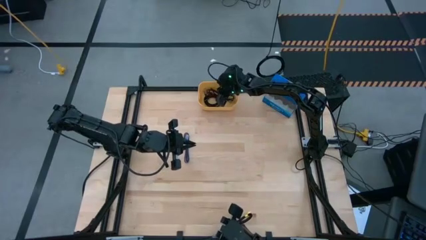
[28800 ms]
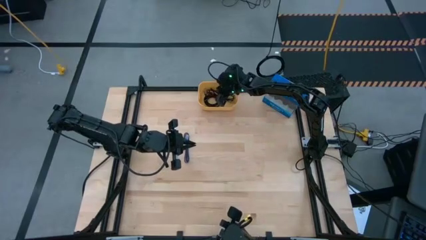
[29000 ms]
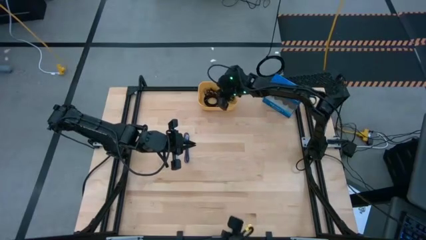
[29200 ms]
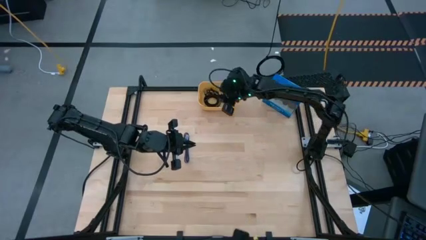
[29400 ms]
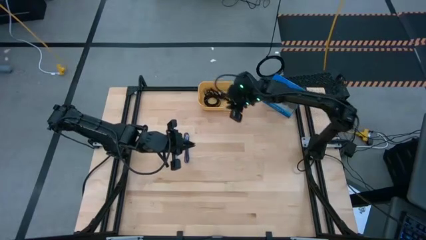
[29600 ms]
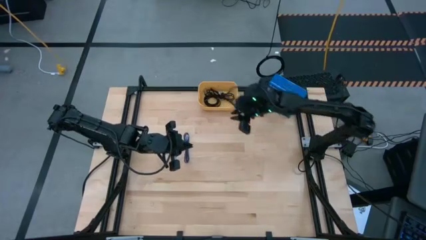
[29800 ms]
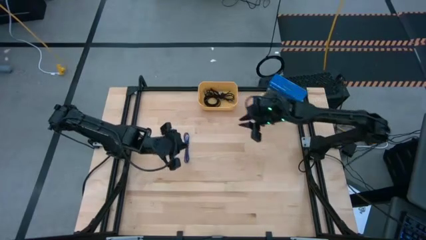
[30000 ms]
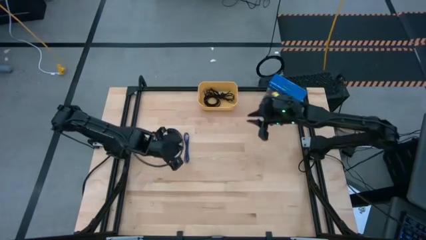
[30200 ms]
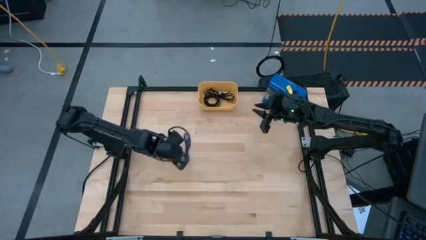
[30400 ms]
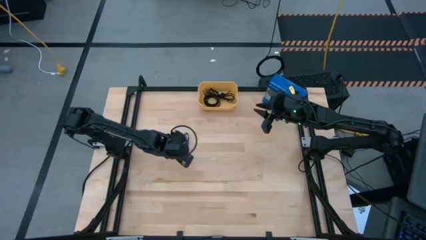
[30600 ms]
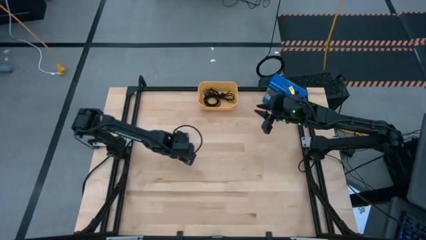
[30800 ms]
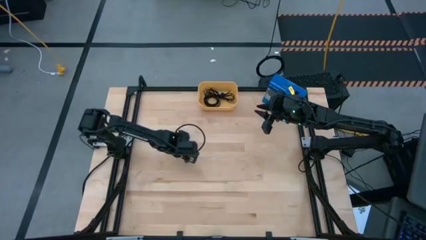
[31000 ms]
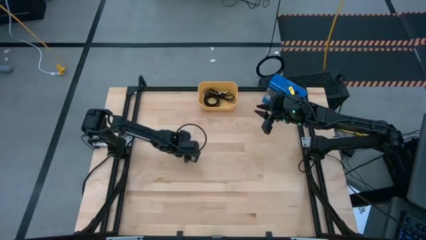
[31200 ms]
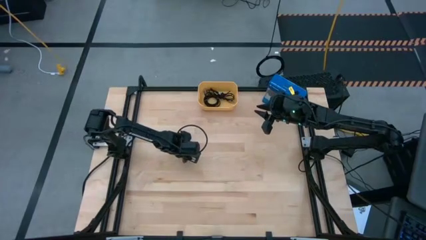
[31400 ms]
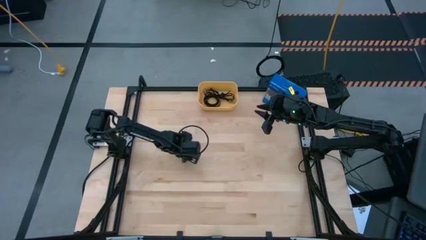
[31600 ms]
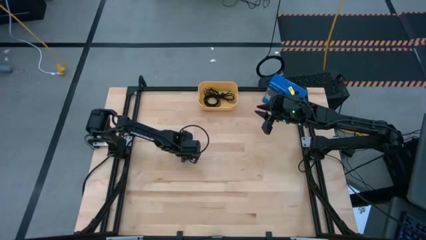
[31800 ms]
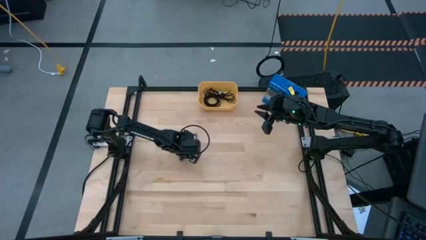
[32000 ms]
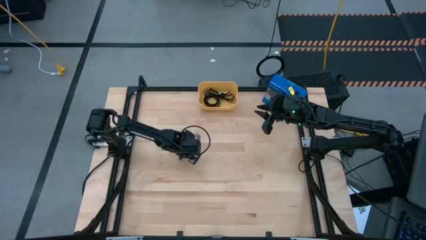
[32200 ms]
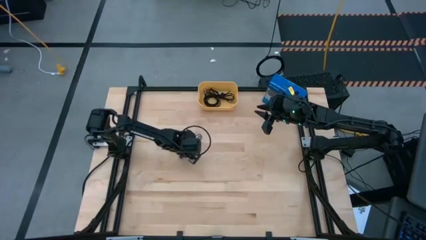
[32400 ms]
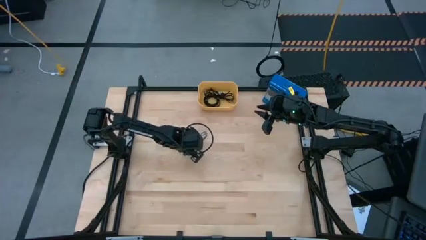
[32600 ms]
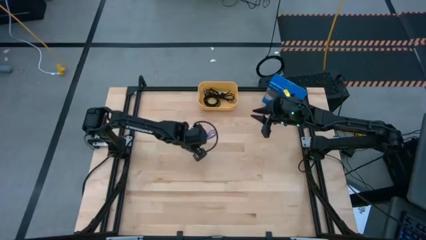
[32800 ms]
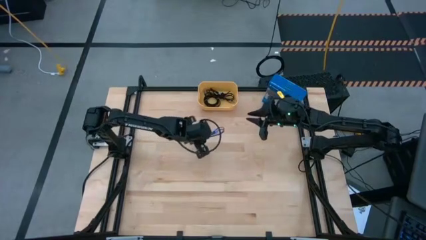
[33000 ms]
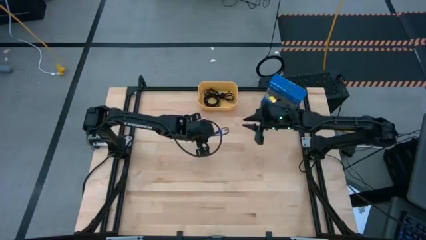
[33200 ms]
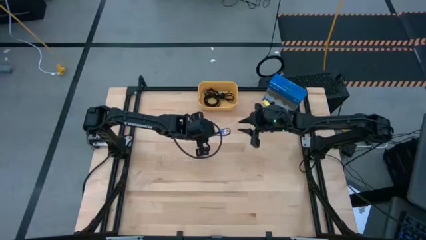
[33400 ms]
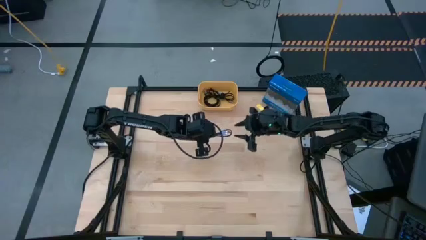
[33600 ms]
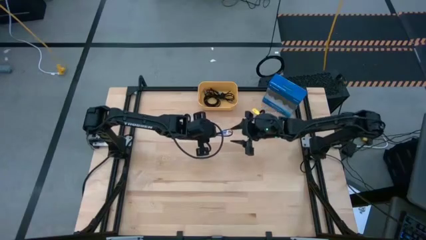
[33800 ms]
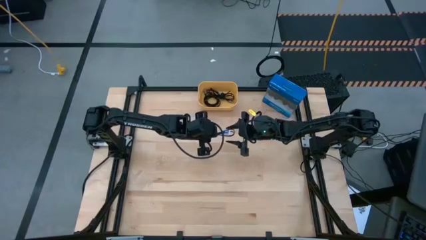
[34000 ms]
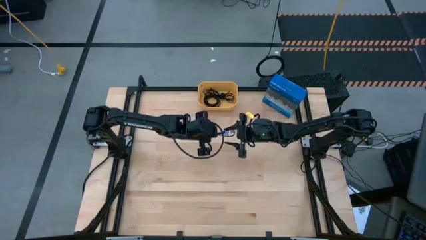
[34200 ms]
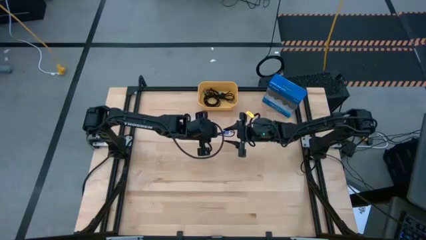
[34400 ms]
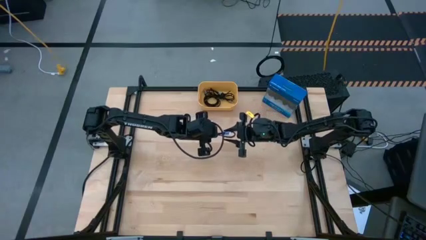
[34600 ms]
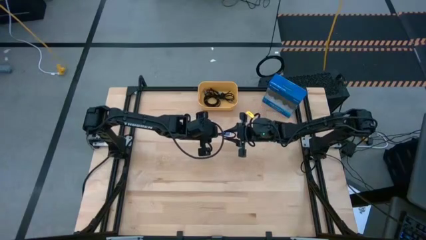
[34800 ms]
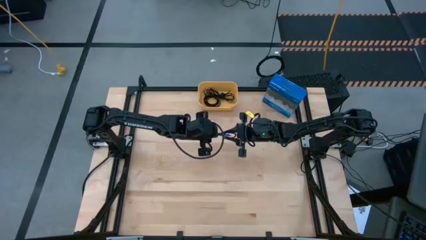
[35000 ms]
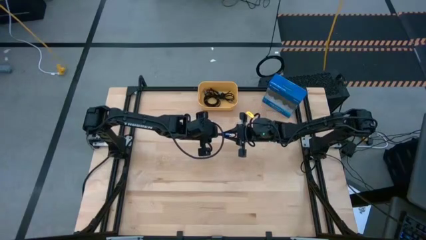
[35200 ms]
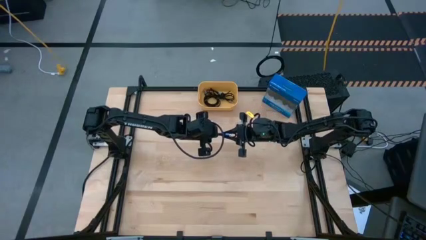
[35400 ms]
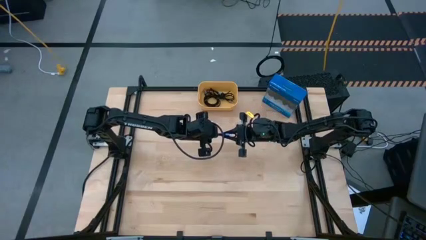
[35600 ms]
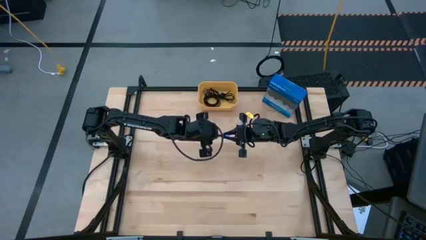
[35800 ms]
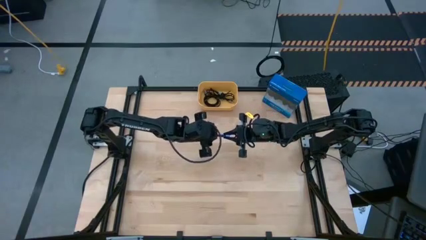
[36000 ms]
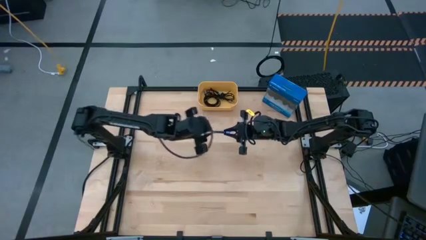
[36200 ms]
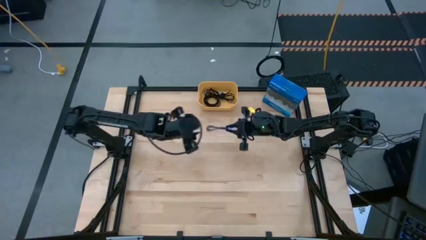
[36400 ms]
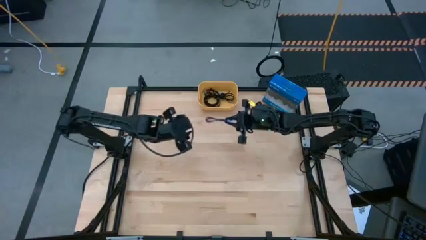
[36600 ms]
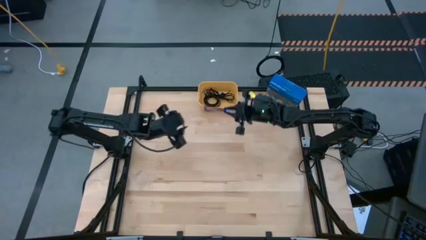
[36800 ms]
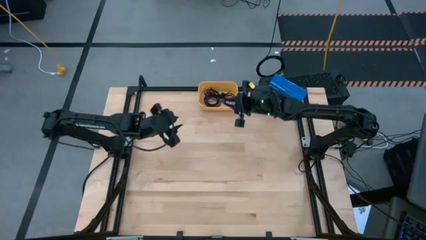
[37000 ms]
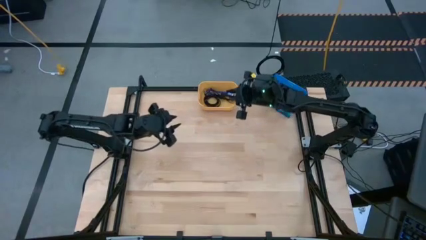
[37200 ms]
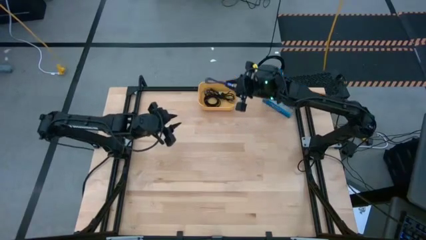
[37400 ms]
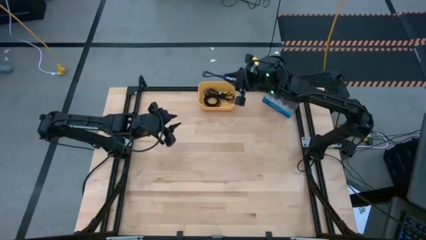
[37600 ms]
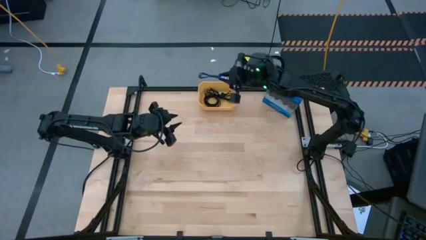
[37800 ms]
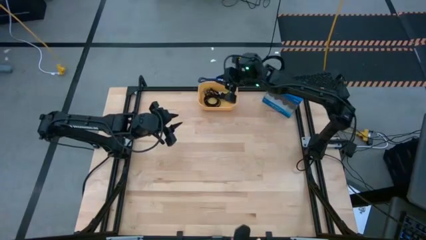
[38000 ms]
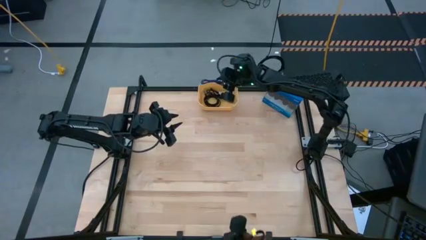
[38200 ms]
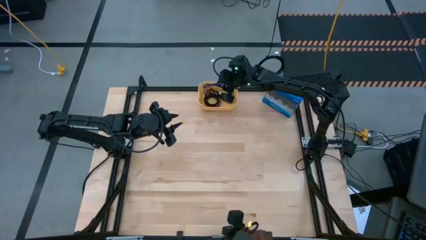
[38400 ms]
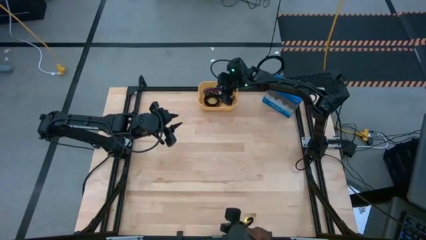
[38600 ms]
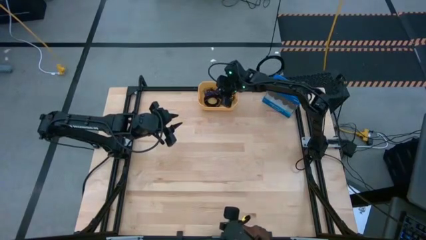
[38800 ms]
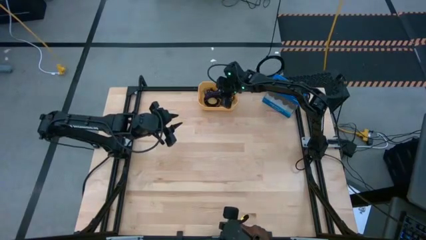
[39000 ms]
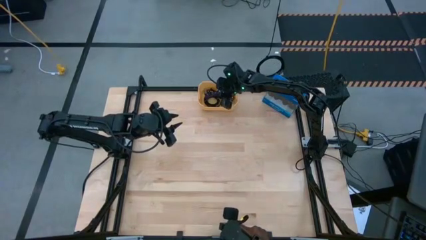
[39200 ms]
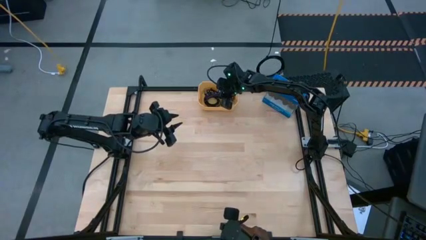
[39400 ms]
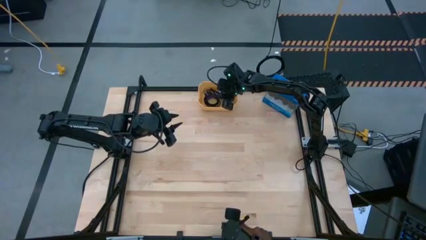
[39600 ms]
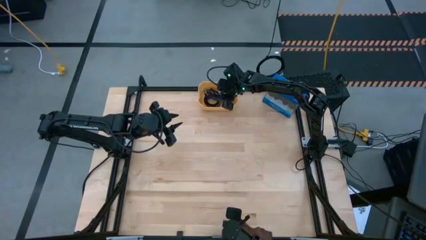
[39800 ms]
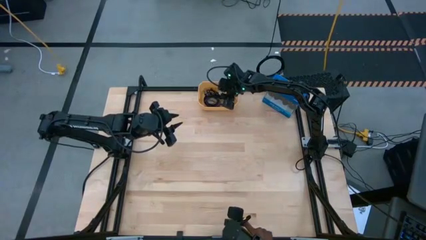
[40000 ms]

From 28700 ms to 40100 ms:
Task: Pick and place USB-C Cables
Put the blue charger cable into the yellow bin

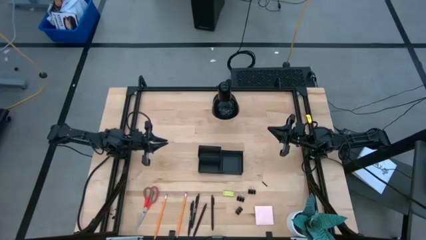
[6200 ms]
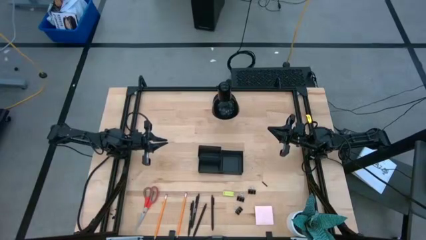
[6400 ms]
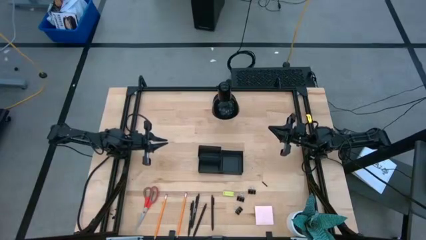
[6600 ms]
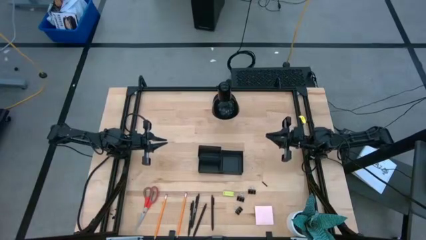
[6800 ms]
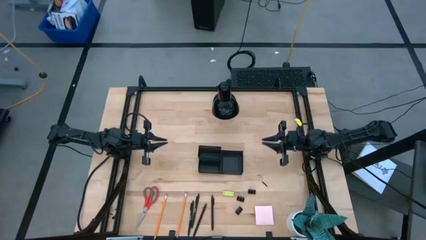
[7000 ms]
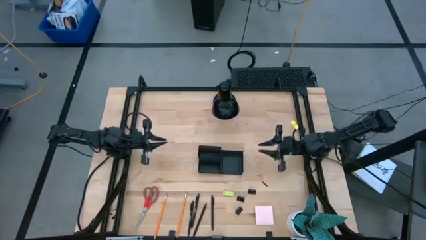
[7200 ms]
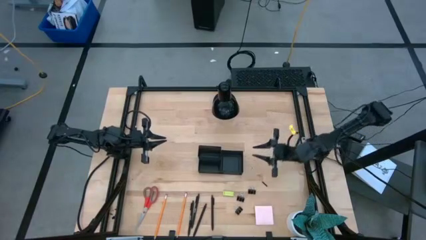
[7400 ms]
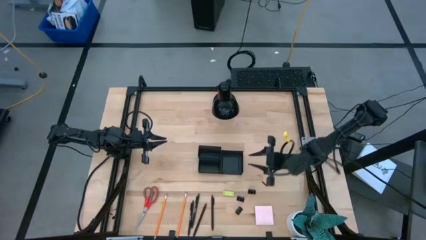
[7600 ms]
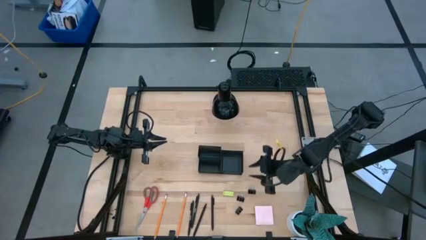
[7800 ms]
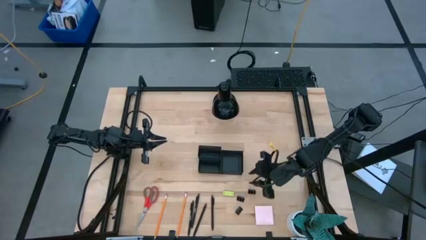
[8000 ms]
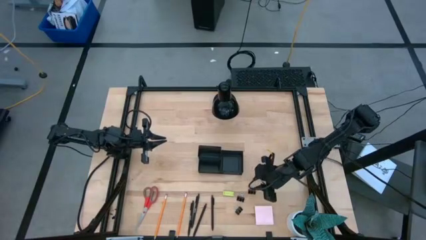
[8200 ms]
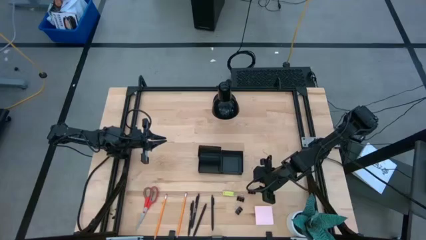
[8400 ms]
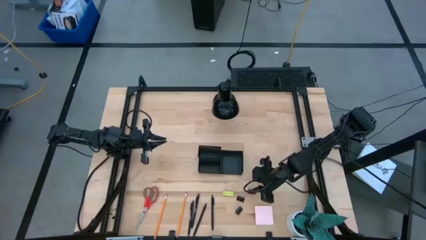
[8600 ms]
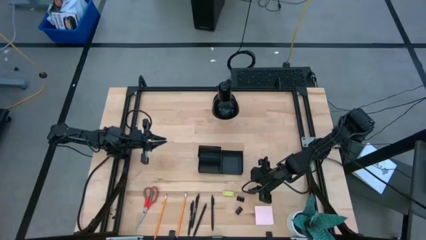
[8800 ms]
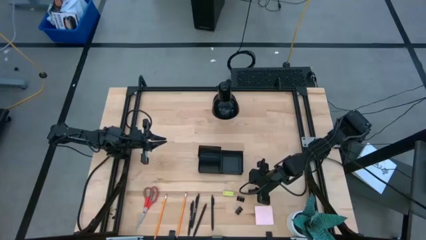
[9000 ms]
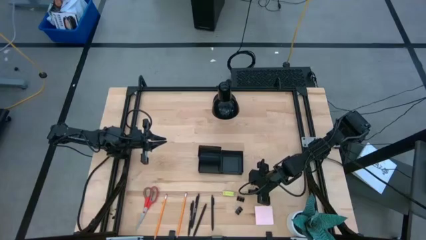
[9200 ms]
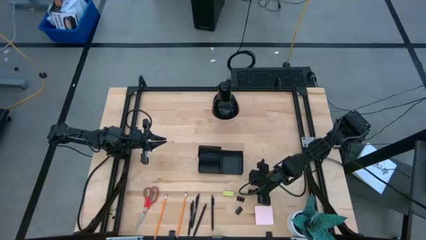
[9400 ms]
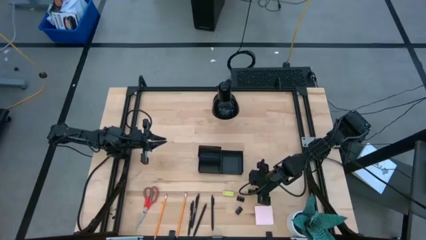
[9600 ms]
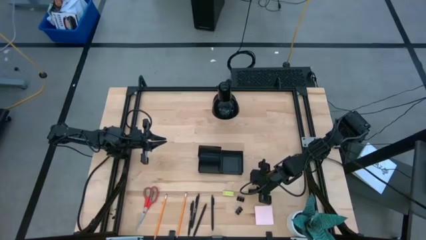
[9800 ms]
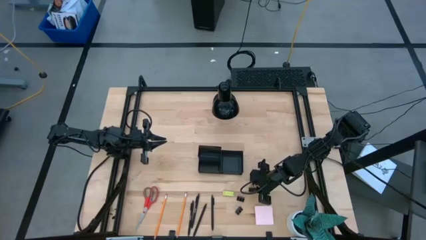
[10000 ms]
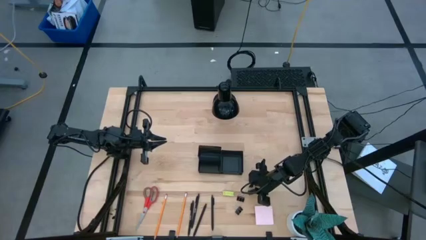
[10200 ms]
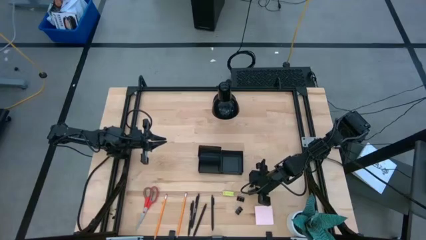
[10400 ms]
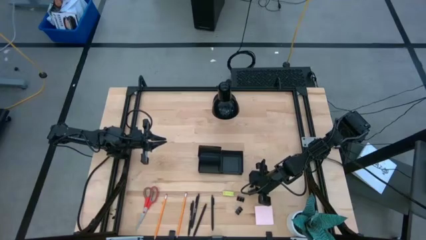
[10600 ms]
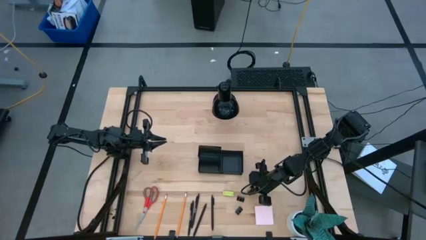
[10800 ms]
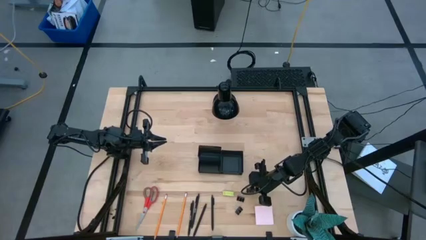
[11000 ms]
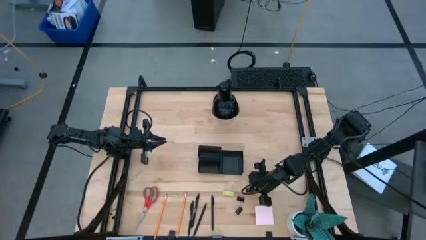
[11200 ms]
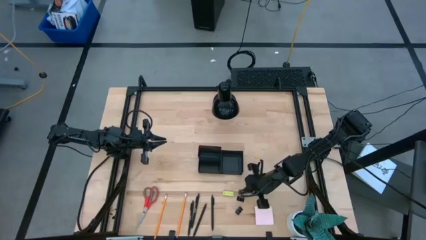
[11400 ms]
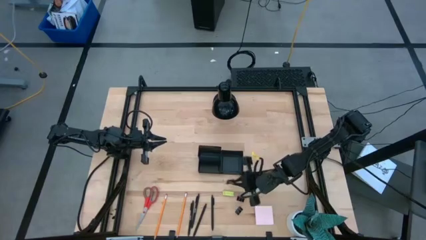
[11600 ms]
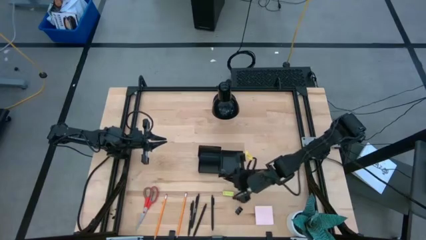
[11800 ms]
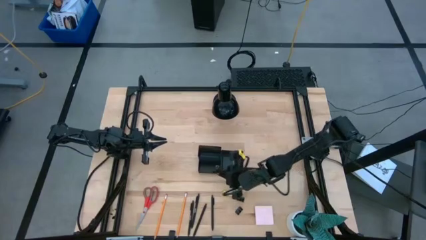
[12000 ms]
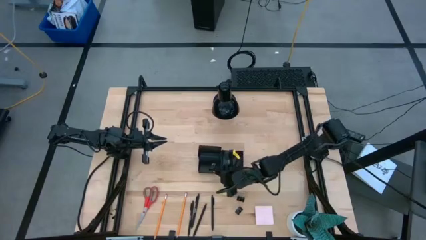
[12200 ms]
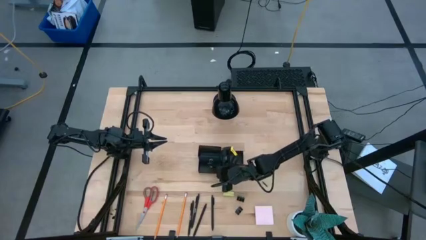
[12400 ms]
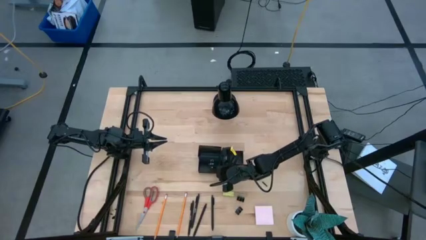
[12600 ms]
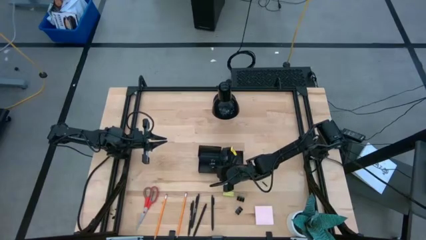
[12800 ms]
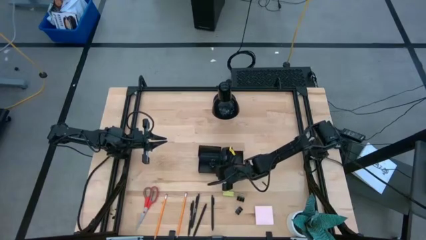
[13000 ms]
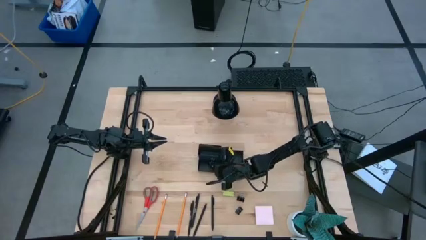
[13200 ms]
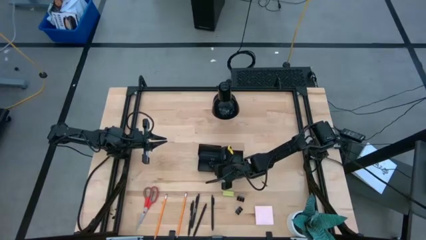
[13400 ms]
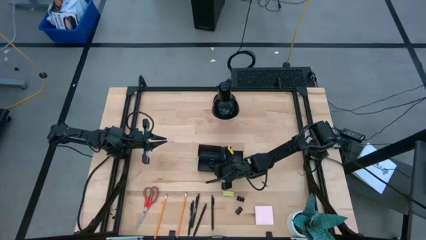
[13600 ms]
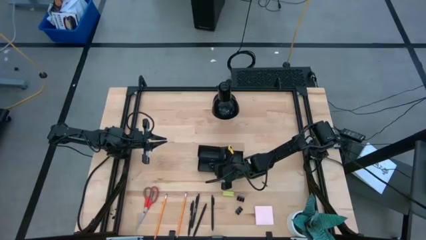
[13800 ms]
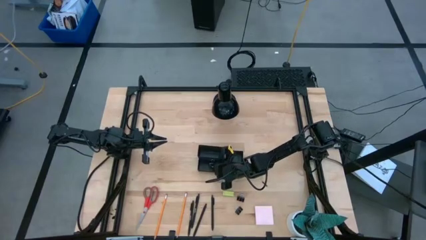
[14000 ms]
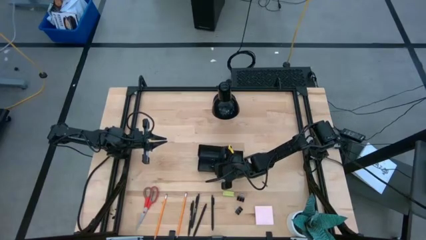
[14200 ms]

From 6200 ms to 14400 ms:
Task: Pick and place office supplies into organizer
Put the top binder clip into the bottom left section of the desk organizer
